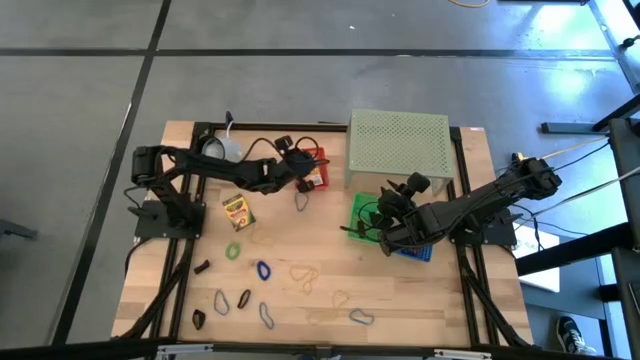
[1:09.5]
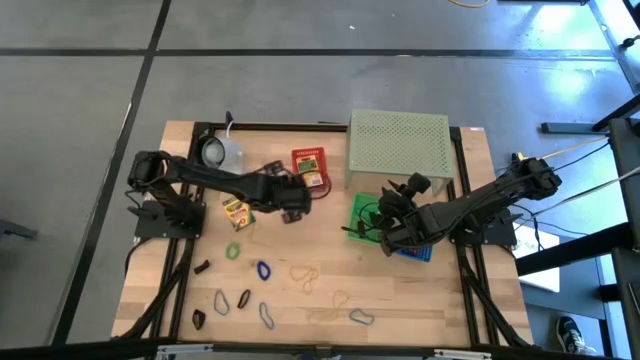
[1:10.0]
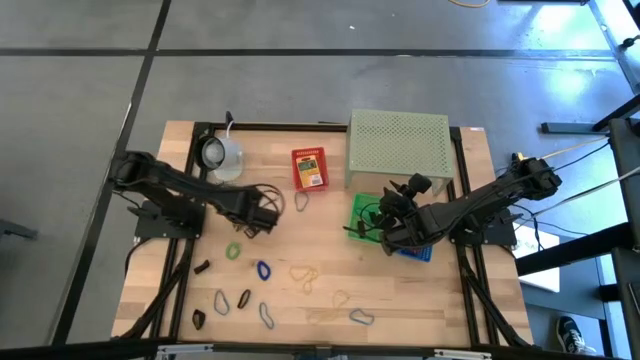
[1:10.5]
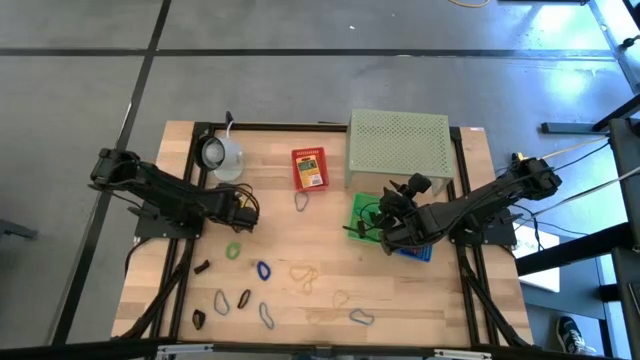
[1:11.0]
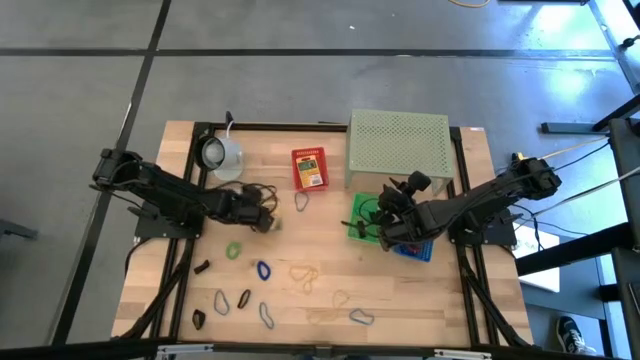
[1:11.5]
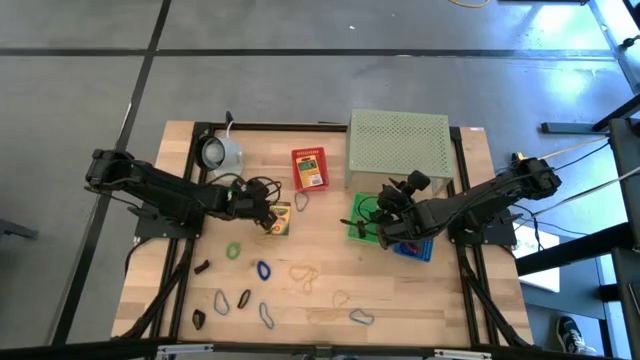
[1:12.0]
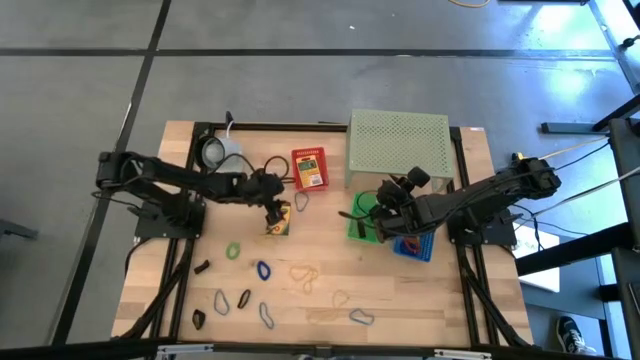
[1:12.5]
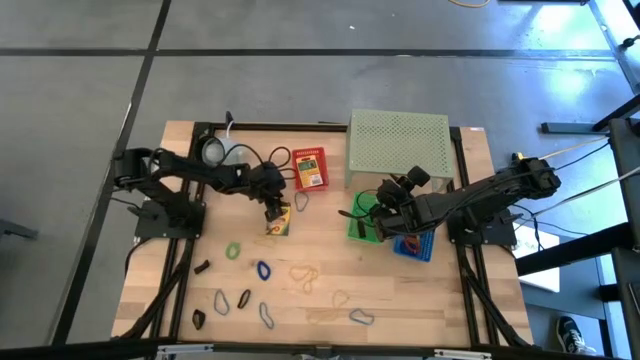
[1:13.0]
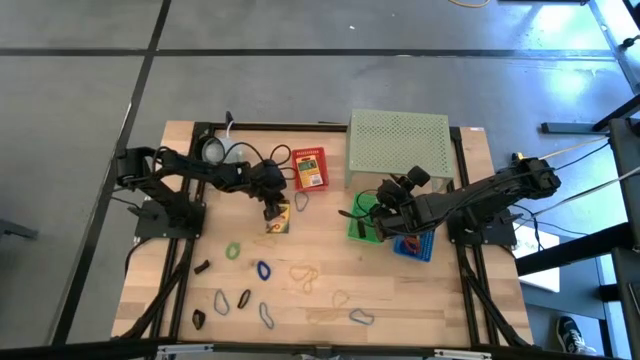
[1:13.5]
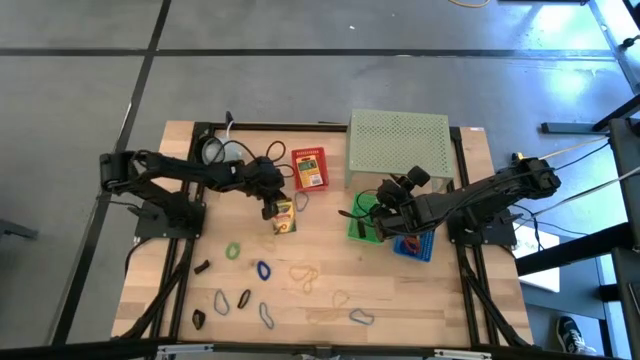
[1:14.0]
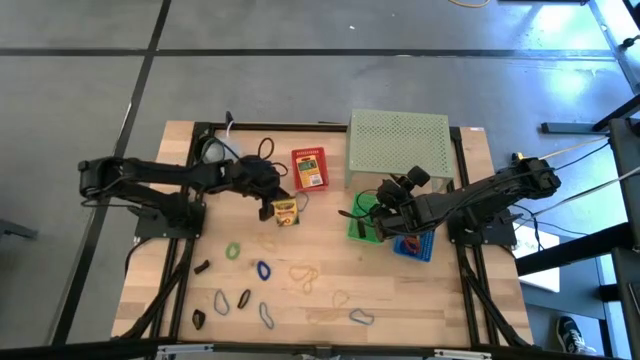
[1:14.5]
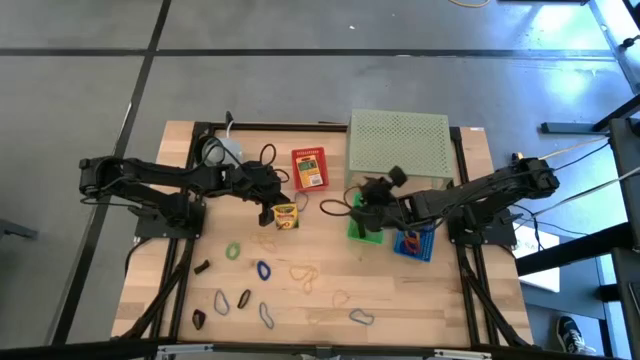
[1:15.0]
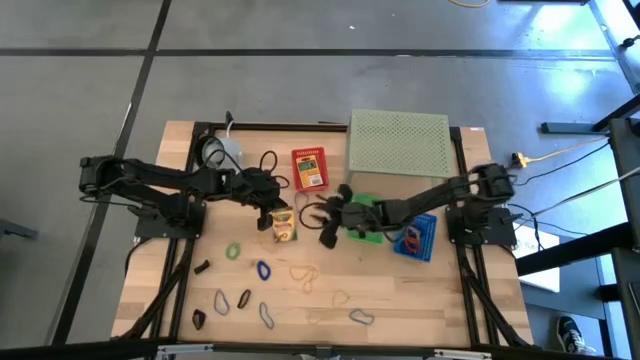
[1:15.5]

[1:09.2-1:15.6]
Task: Pick & Place Office Desk Supplies
Put the yellow crayon box into the red bin

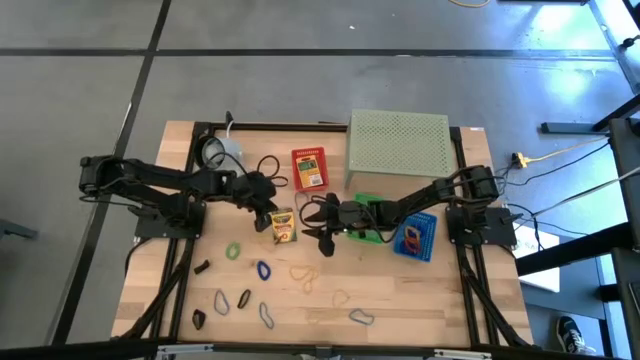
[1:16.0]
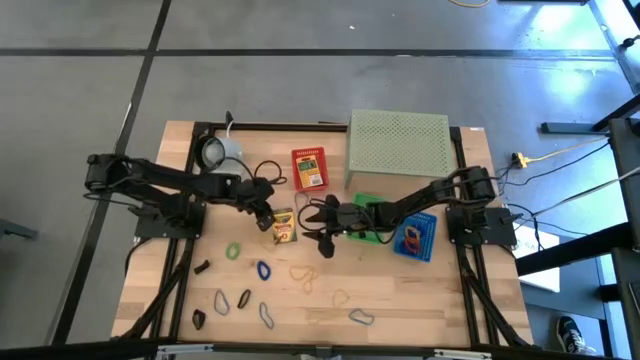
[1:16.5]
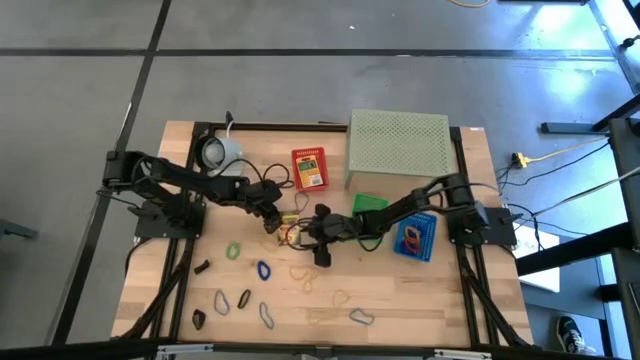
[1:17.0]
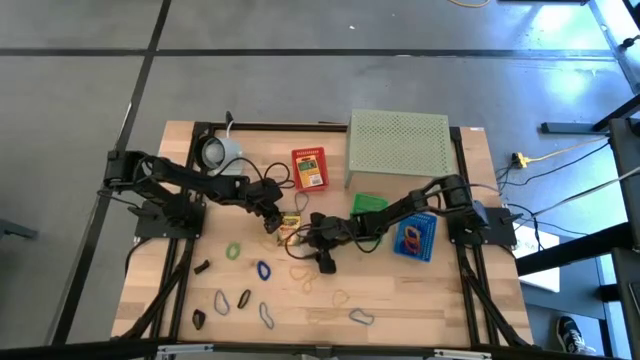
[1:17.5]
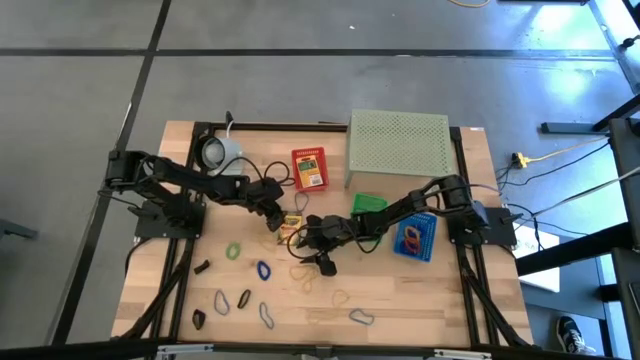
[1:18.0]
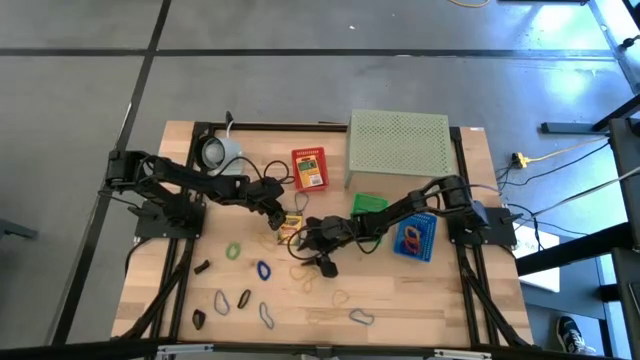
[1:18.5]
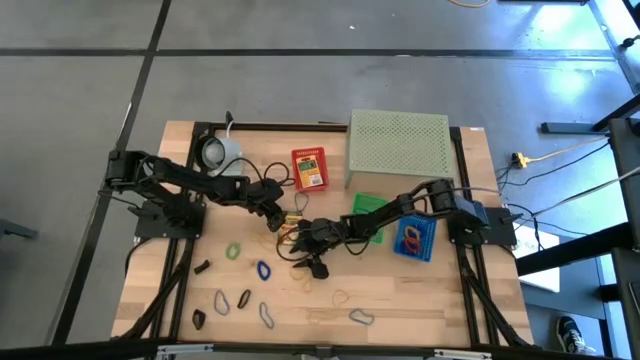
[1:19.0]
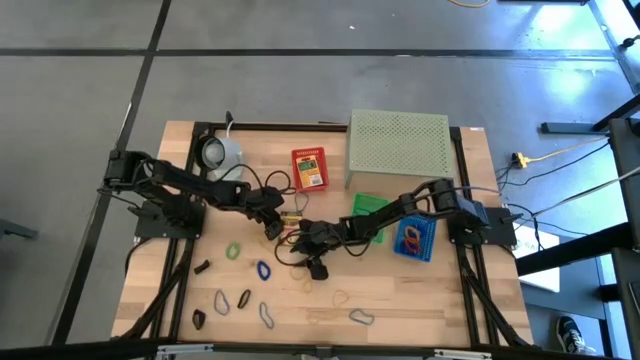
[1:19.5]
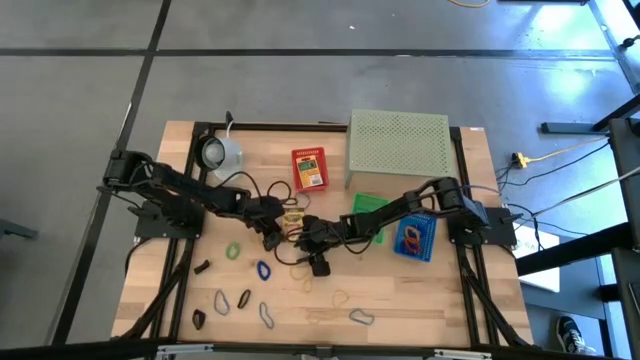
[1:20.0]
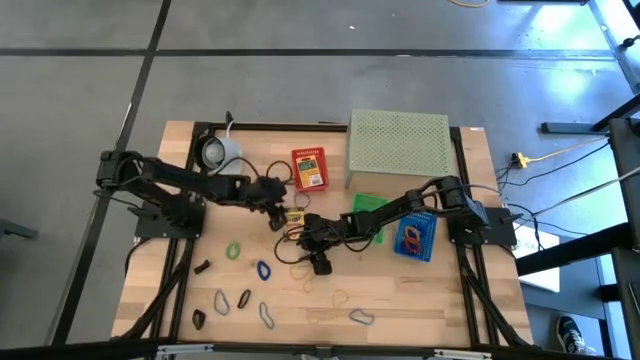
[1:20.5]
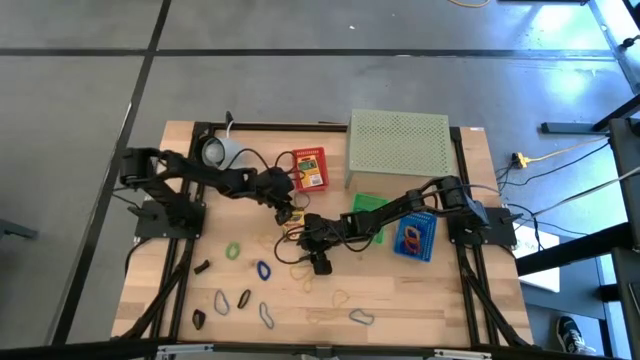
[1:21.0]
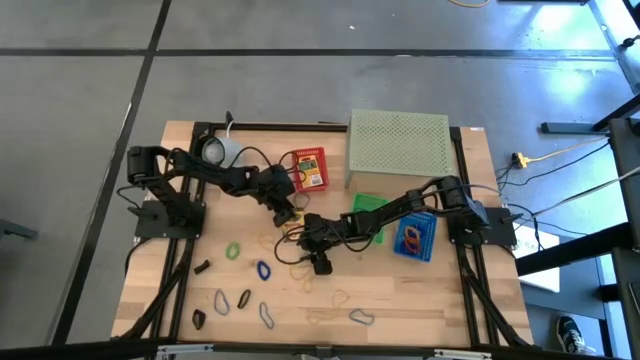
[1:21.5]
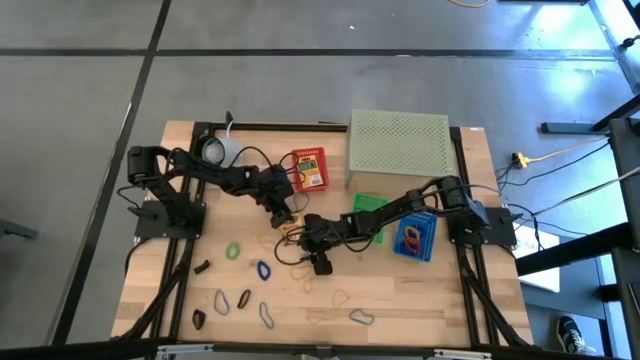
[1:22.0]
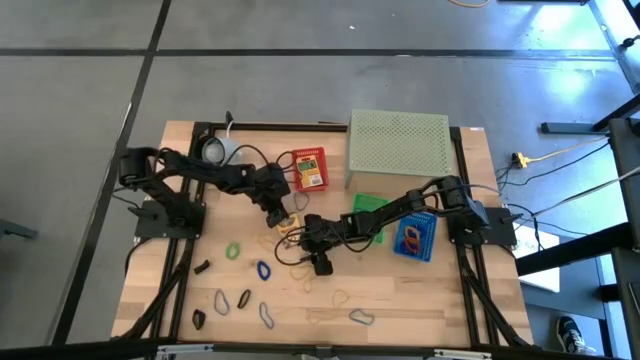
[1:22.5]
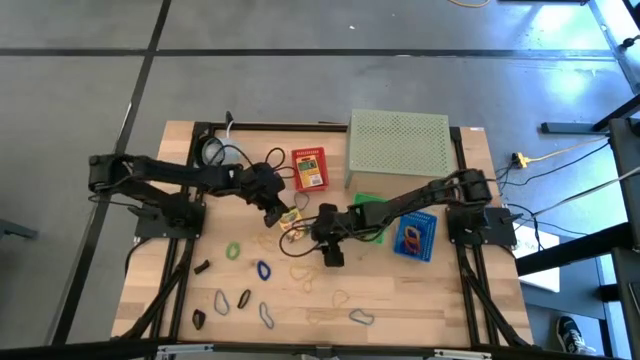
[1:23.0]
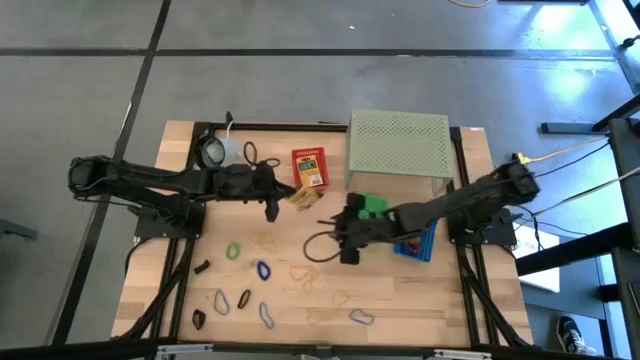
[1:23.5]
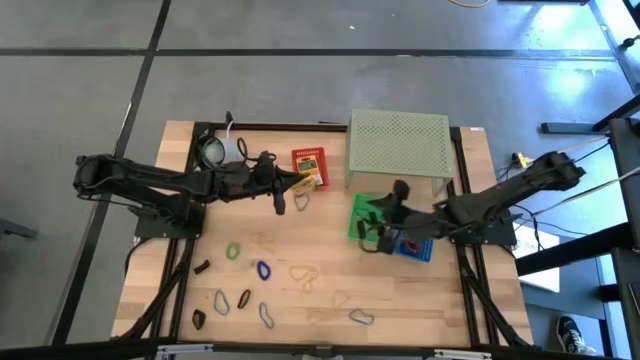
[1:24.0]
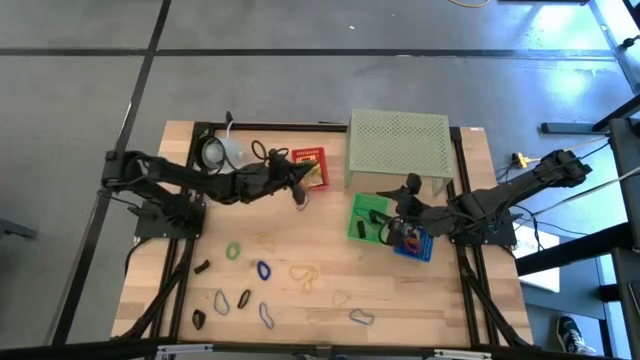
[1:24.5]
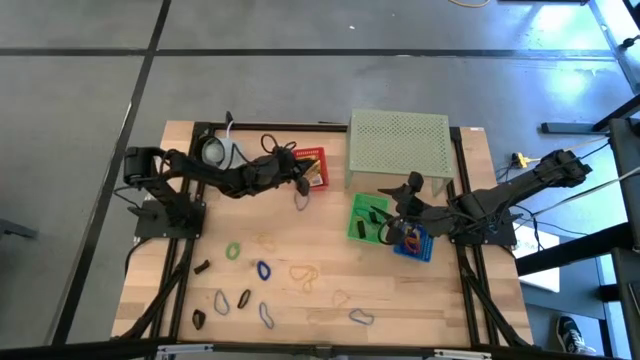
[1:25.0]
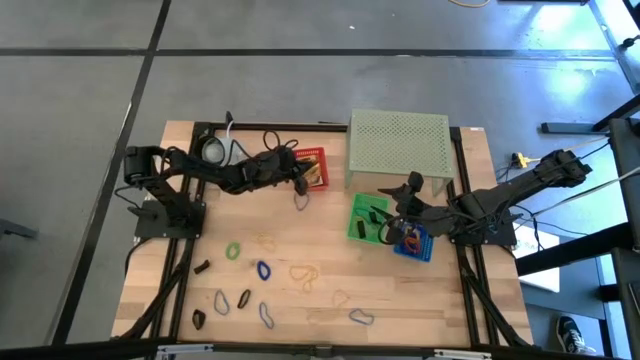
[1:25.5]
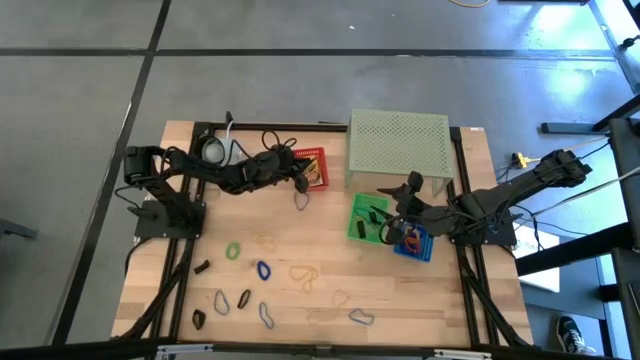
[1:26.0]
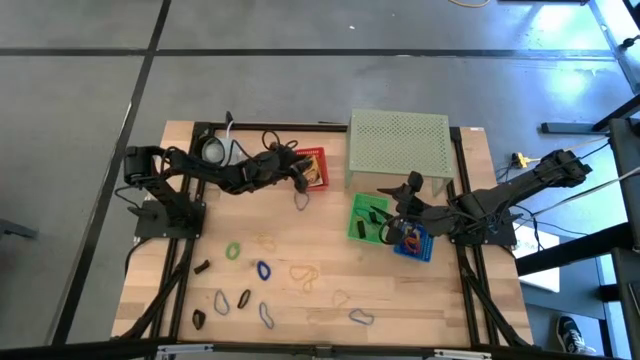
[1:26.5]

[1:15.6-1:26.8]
Put the yellow crayon box into the red bin

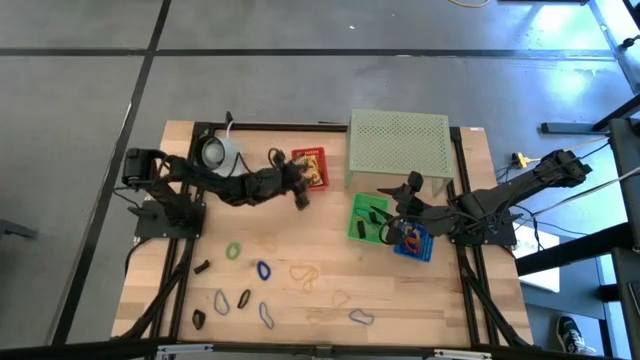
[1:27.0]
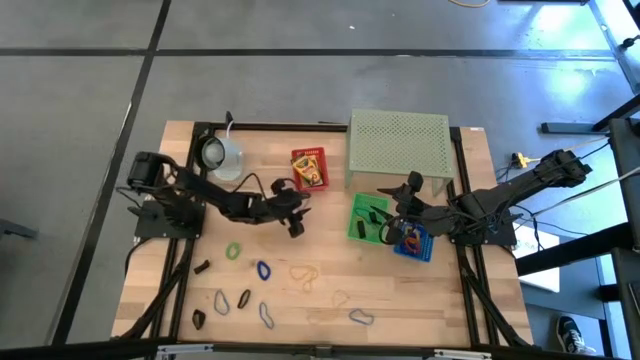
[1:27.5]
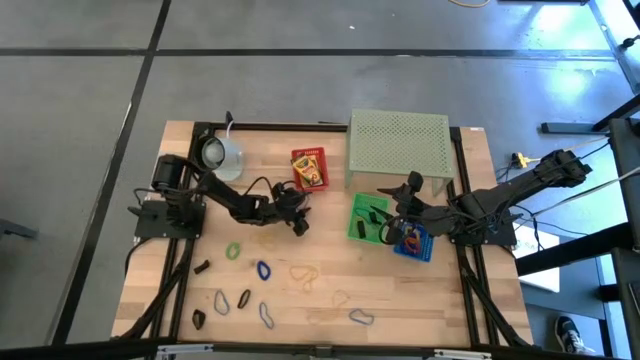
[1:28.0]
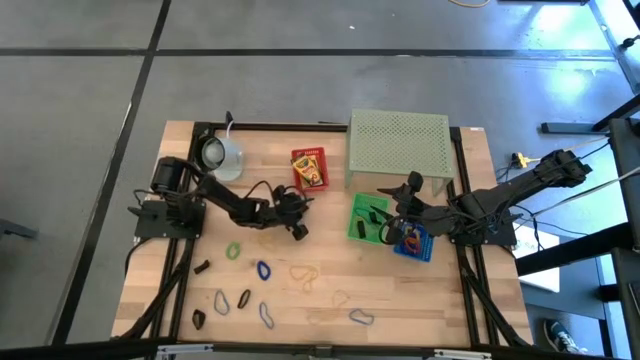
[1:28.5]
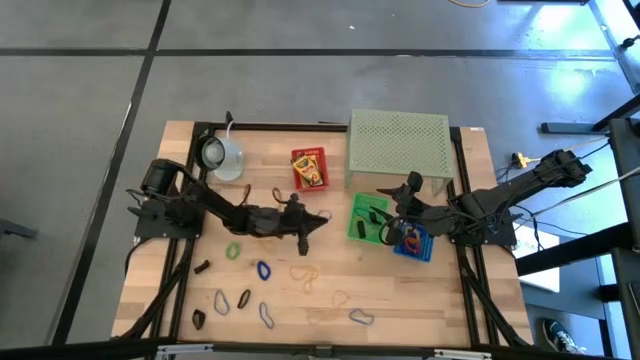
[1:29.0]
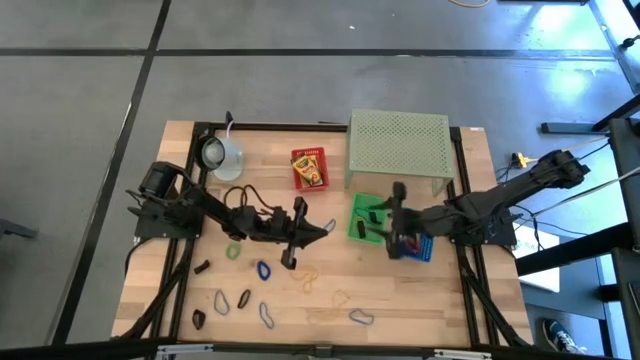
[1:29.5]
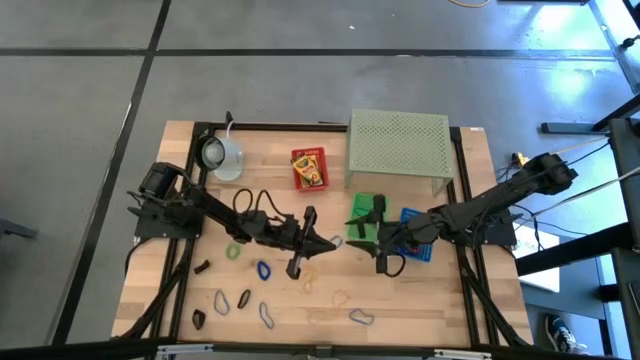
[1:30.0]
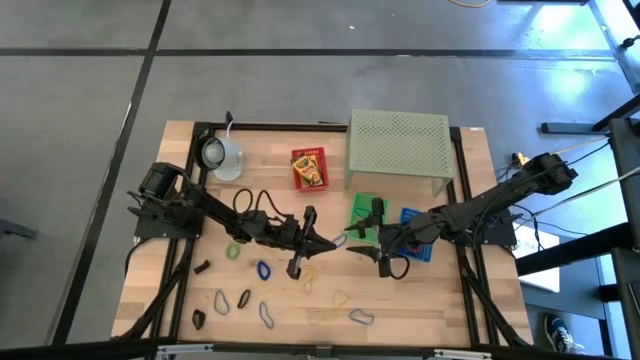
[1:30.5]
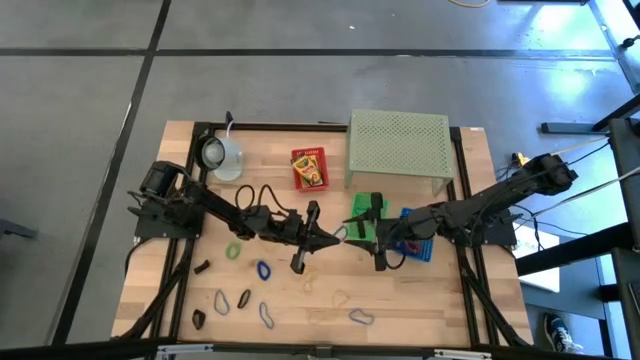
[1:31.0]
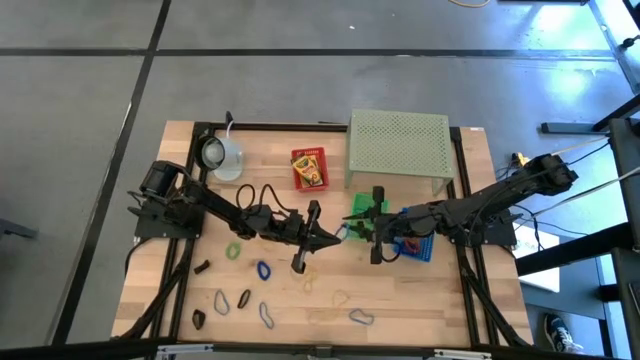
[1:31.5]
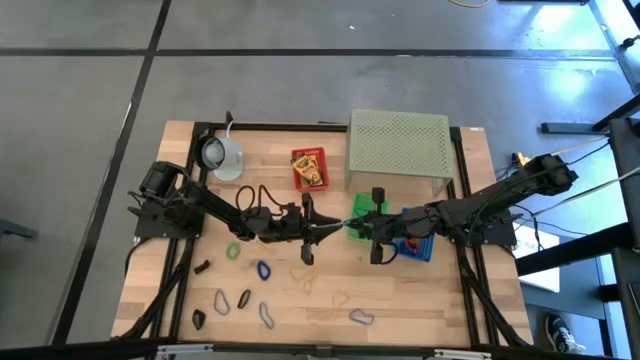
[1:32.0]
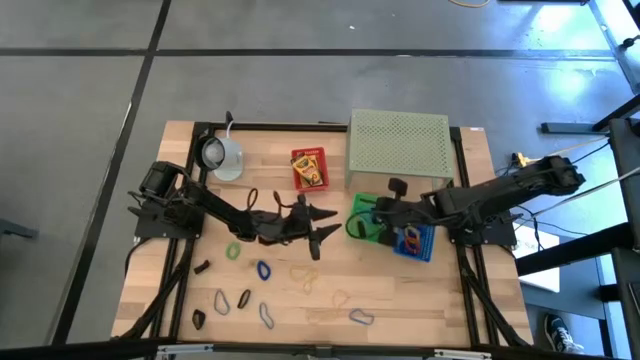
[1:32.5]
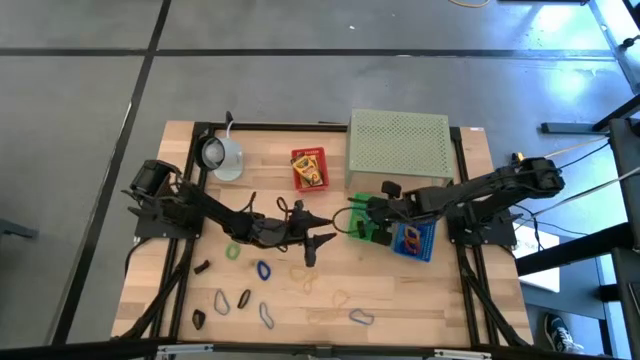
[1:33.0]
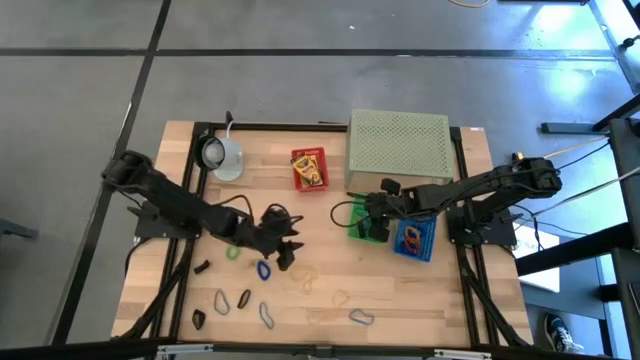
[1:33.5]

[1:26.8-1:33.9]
Put the blue rubber band into the green bin
